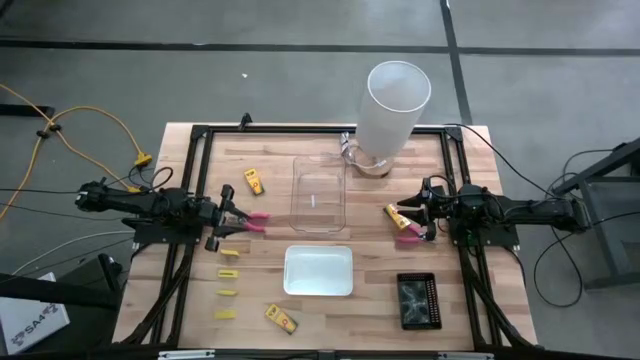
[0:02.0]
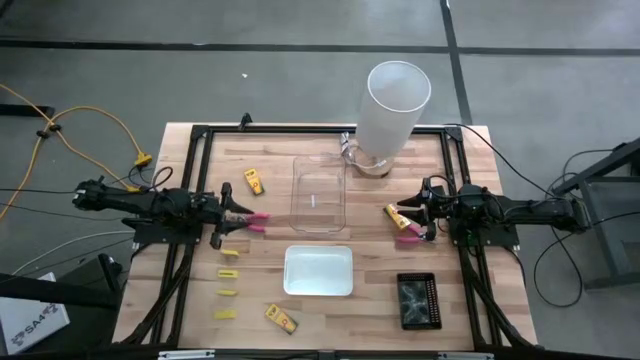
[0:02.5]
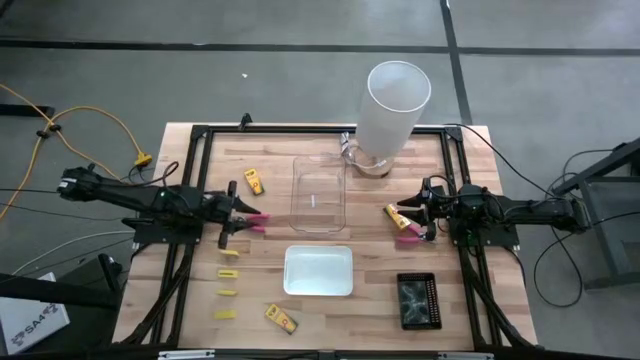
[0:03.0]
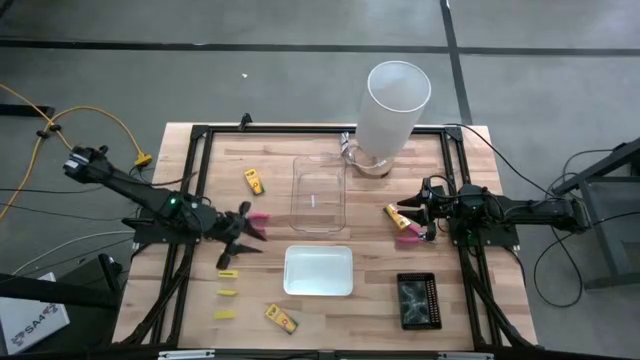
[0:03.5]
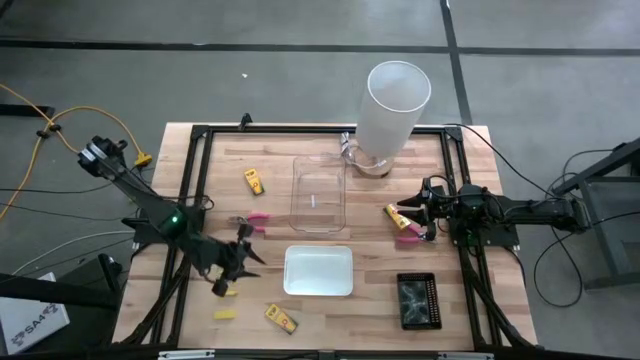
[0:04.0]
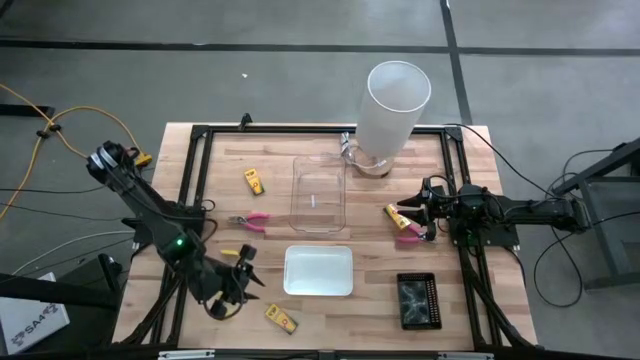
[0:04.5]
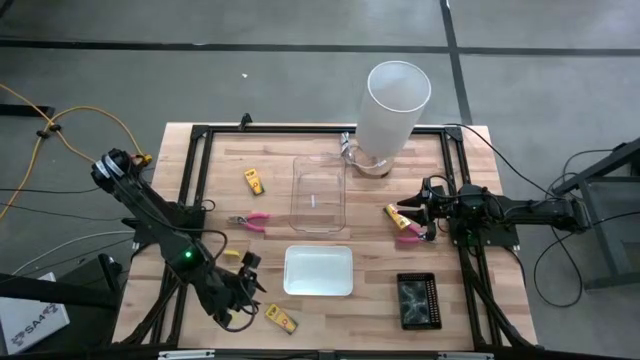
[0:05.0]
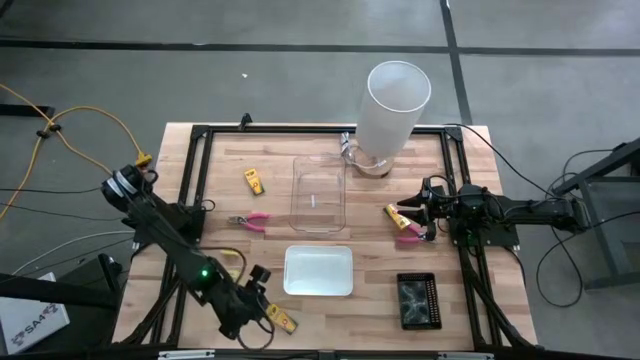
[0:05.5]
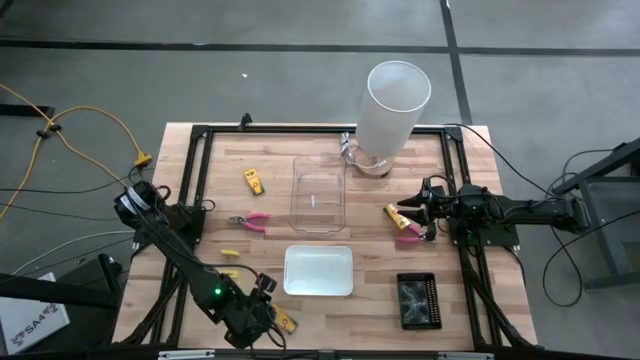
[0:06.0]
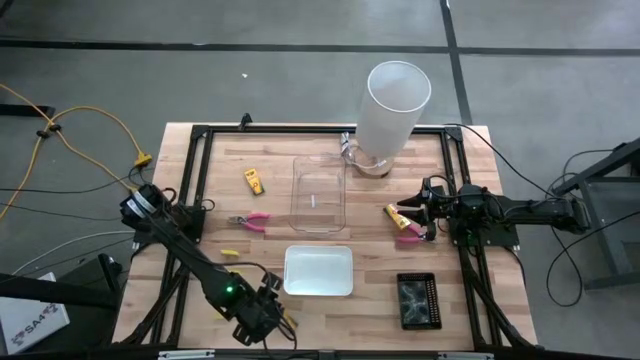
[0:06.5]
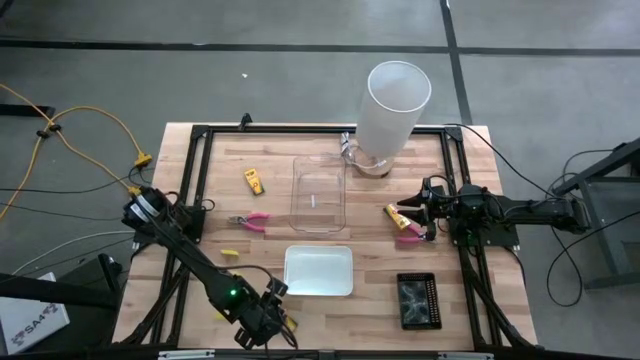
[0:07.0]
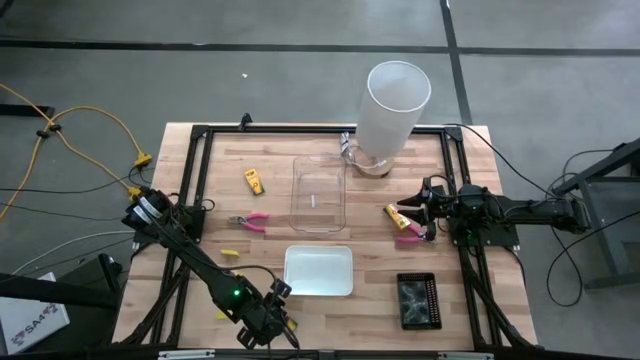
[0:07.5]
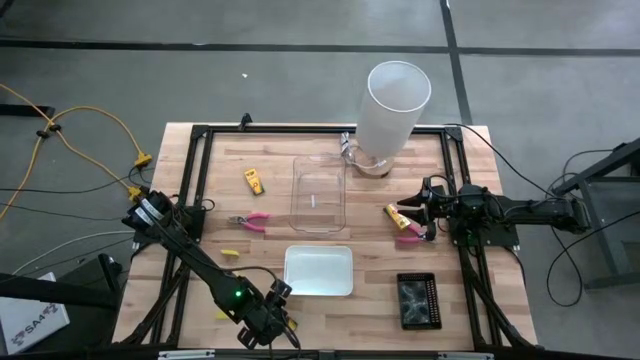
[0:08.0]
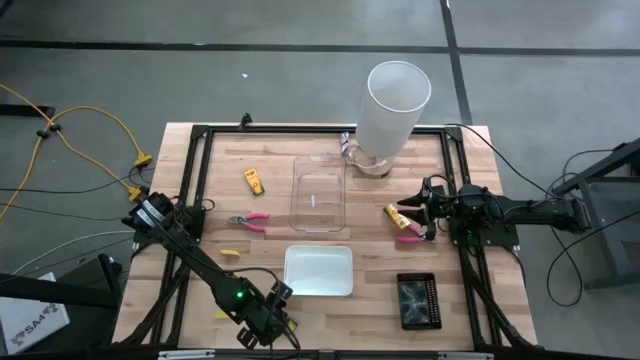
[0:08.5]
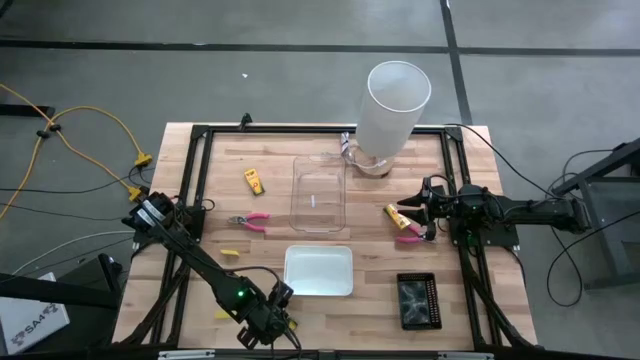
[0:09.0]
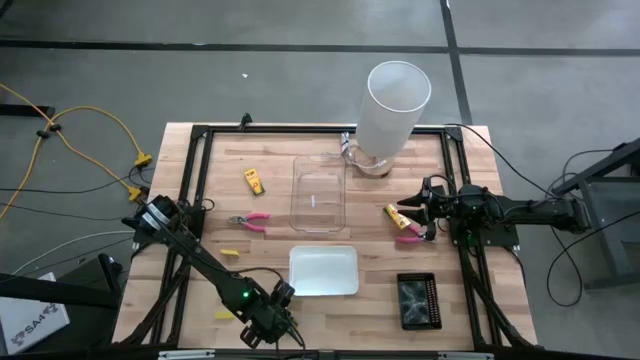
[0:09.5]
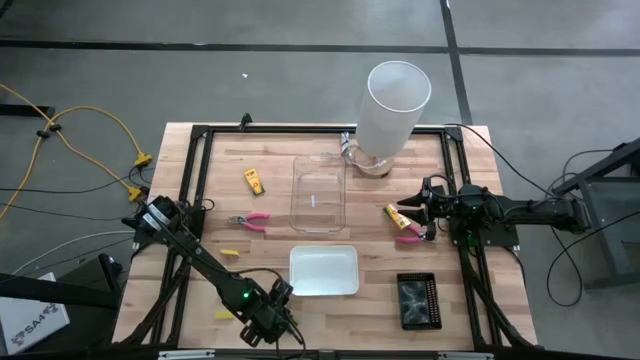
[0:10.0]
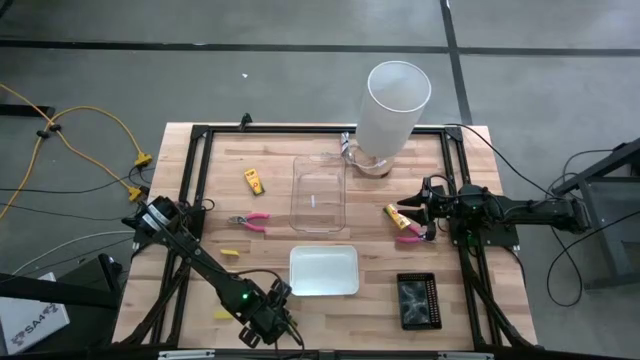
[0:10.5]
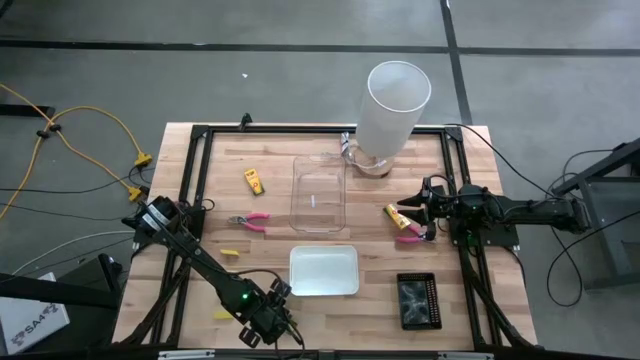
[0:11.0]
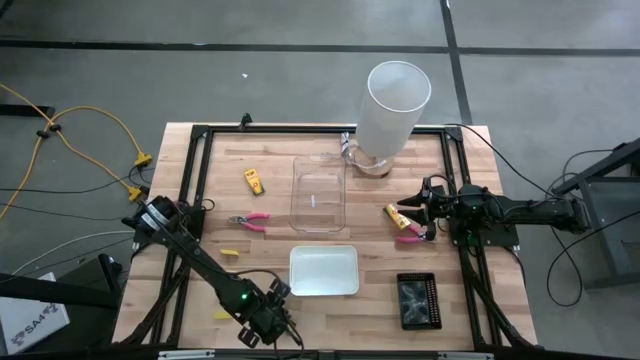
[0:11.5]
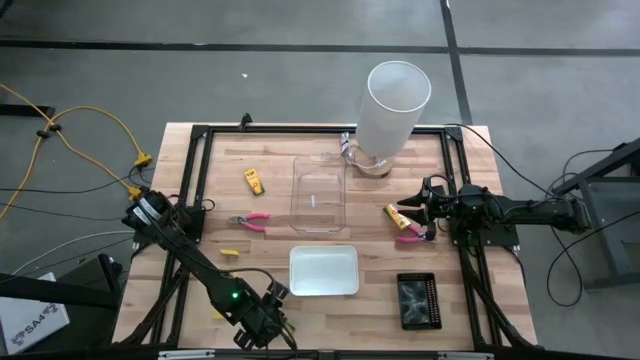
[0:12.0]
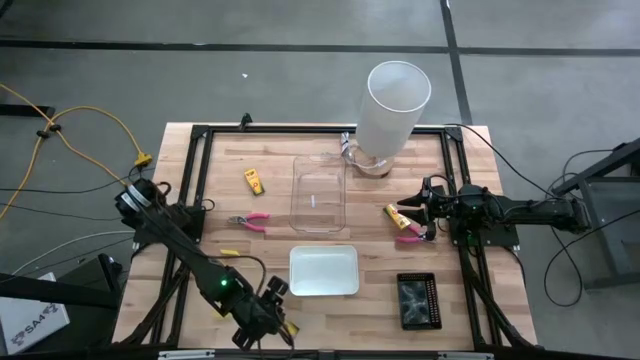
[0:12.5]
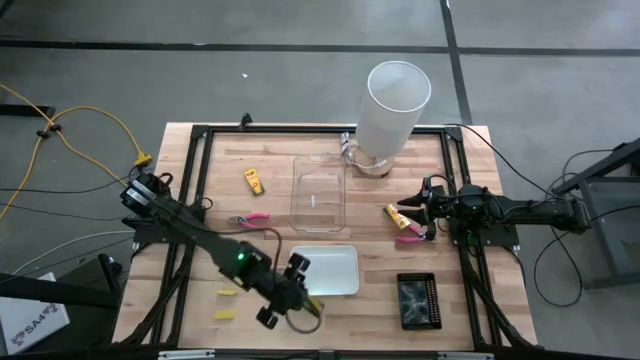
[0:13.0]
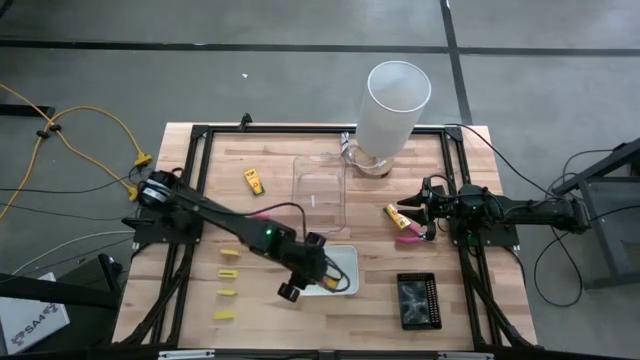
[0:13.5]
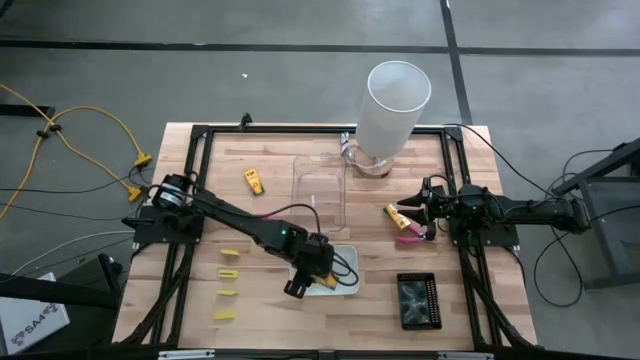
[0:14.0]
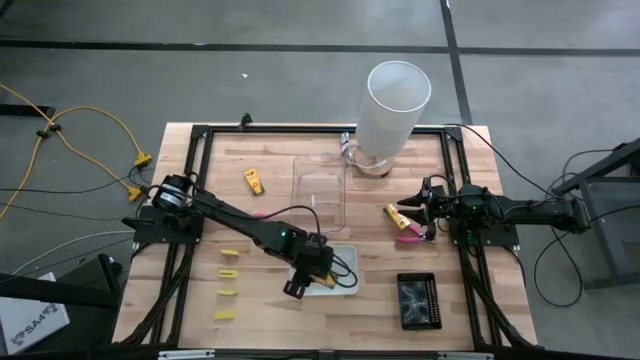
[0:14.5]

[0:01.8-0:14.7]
Task: Pick & Place School Supplies
Put the yellow crayon box into the white bin

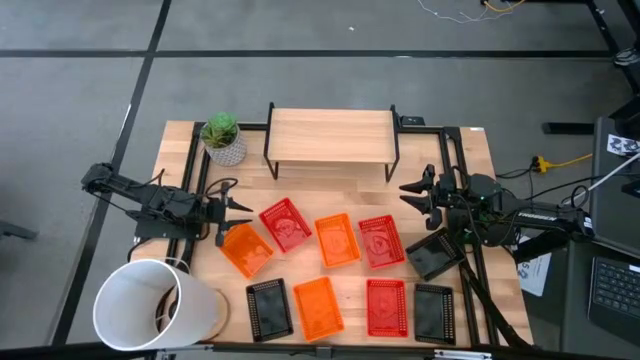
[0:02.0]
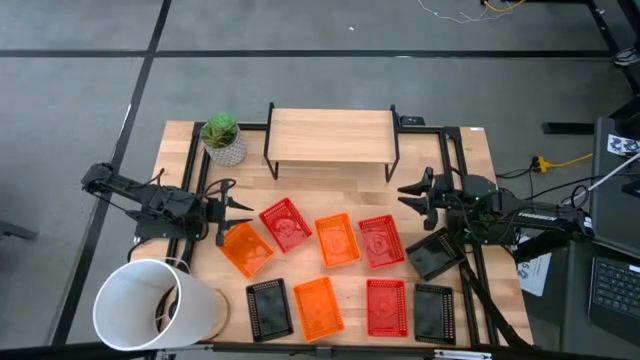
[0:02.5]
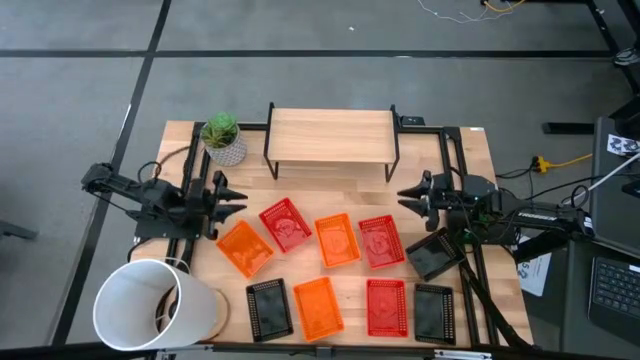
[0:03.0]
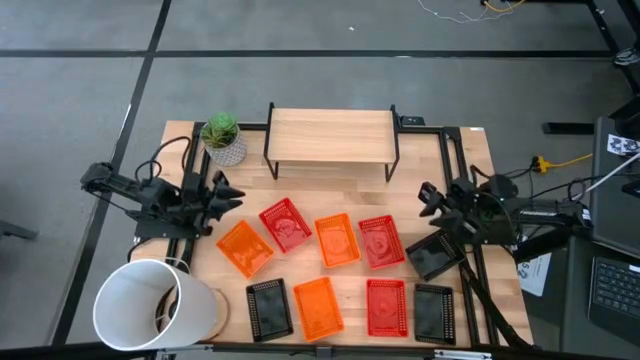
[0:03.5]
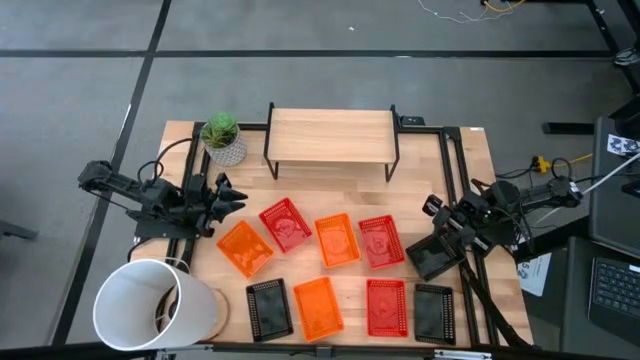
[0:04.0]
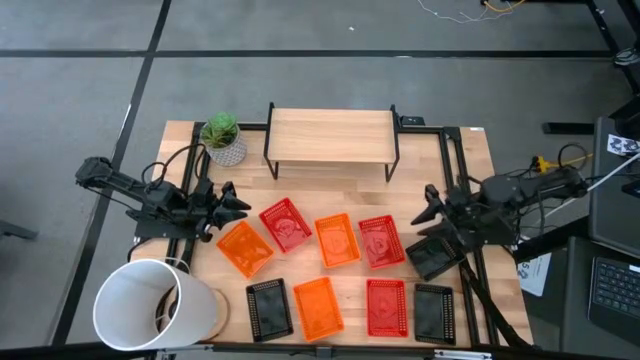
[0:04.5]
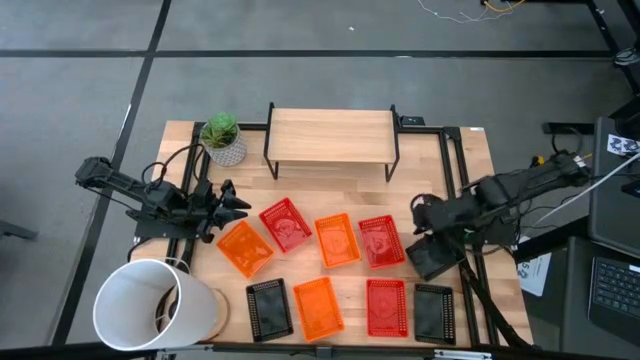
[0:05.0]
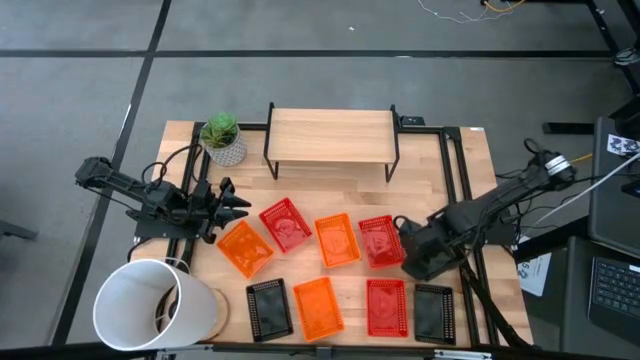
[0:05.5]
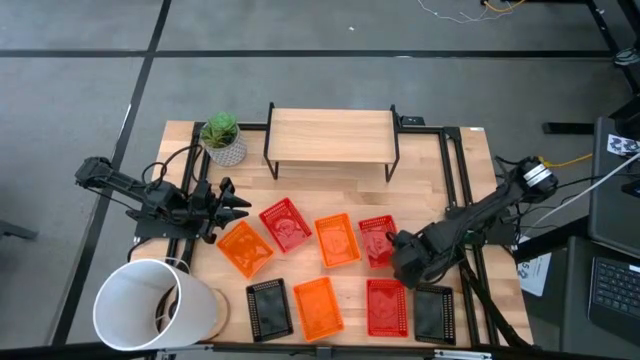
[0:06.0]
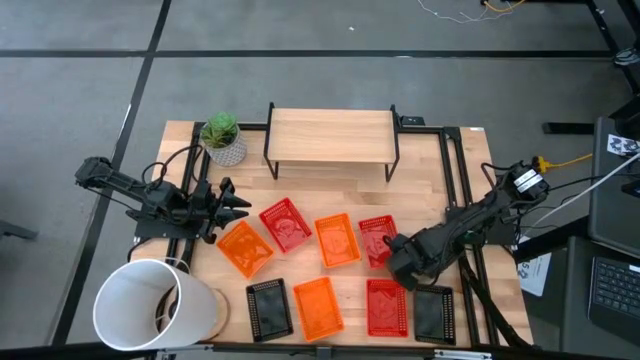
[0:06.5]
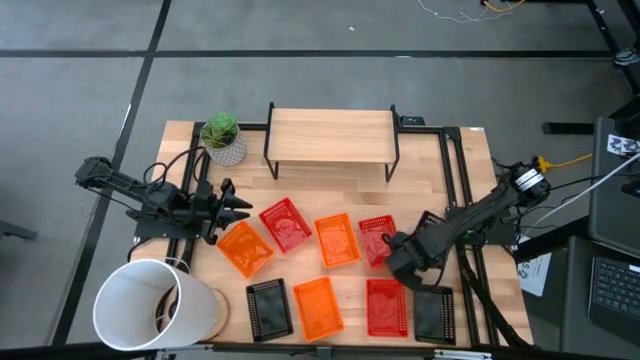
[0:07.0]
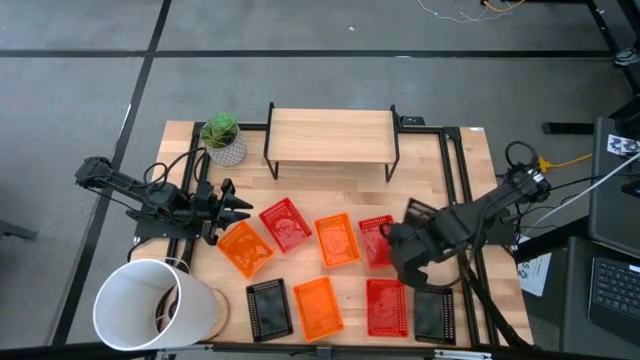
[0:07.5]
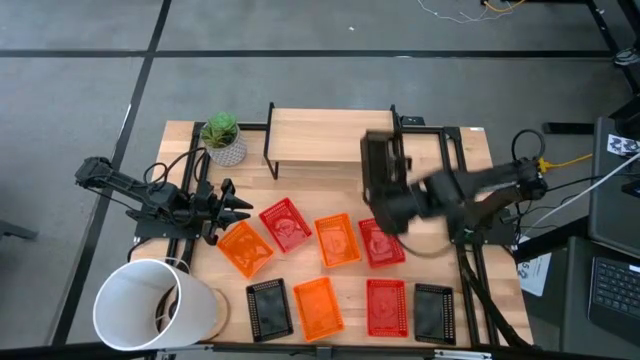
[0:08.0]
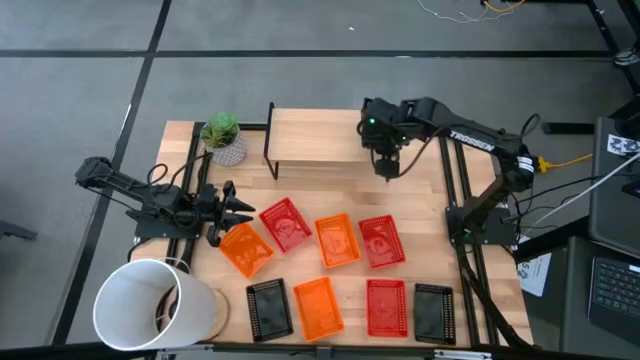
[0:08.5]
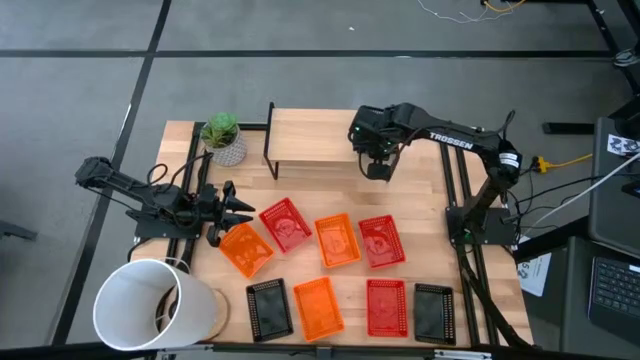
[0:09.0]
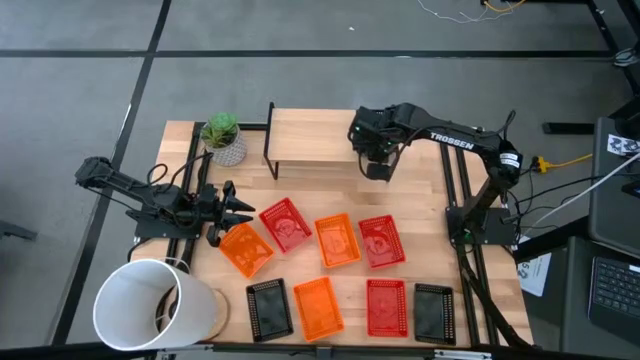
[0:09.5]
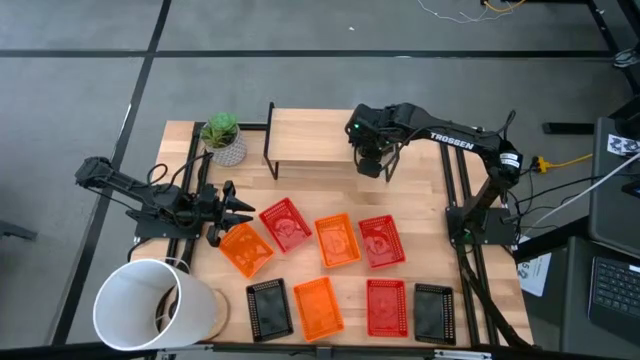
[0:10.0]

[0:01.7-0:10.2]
Task: Stack baskets on shelf by color
Put the top black bin on the shelf
